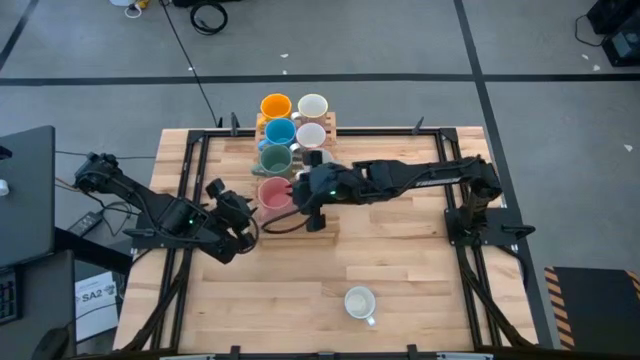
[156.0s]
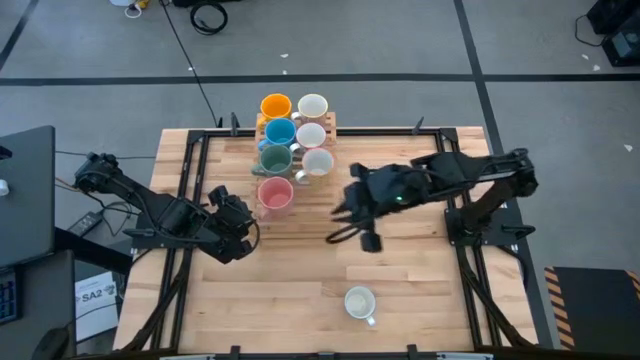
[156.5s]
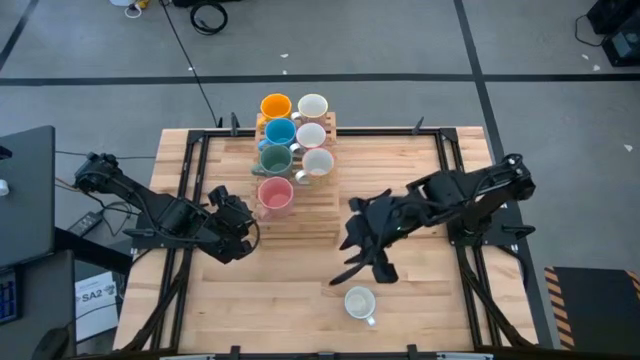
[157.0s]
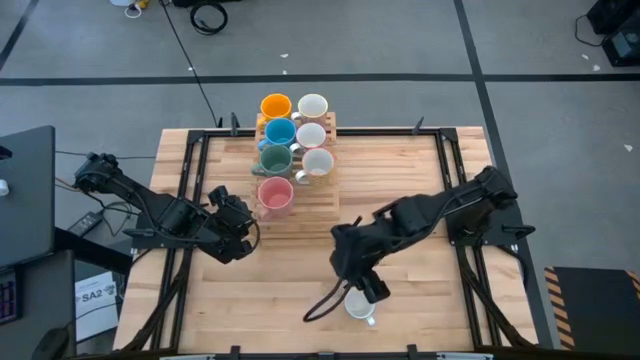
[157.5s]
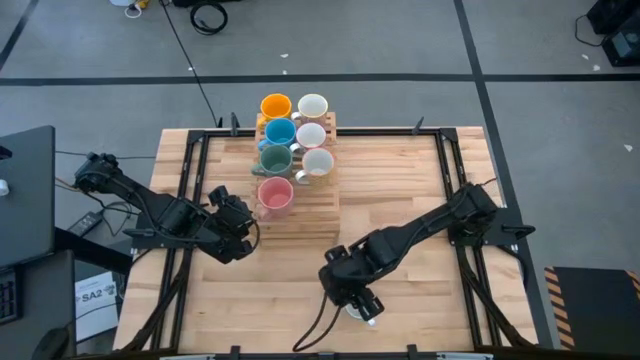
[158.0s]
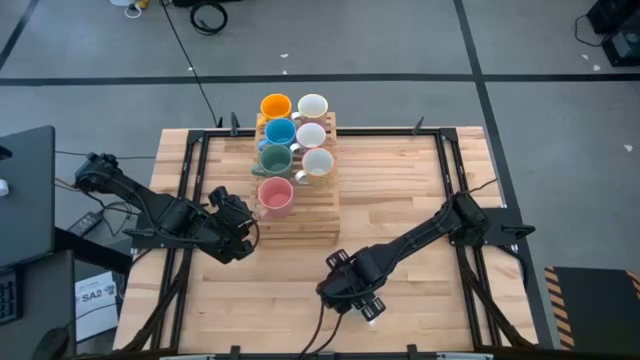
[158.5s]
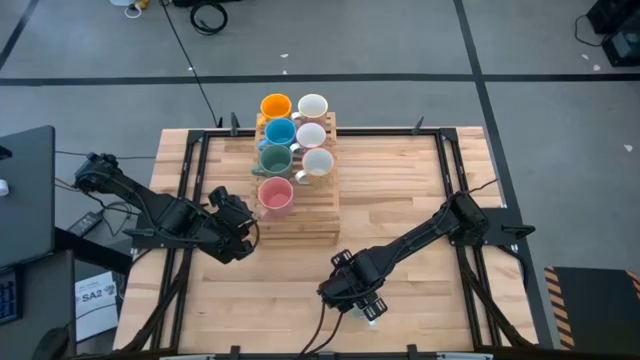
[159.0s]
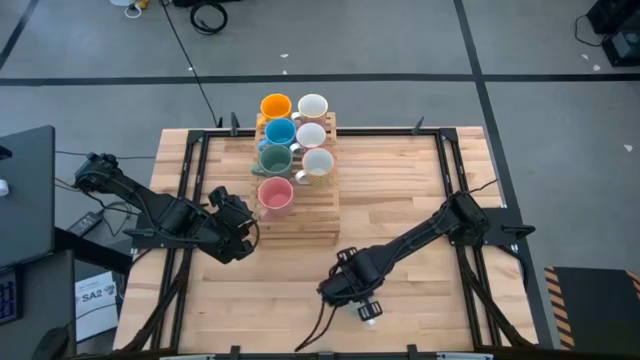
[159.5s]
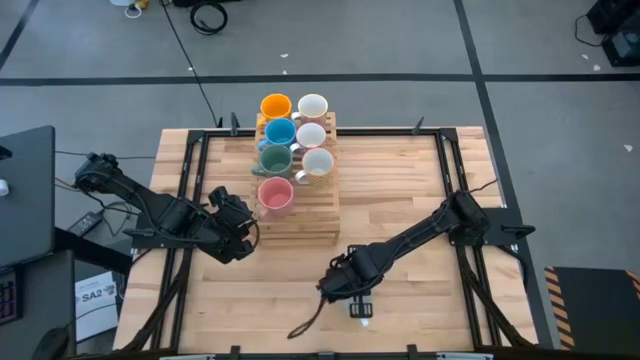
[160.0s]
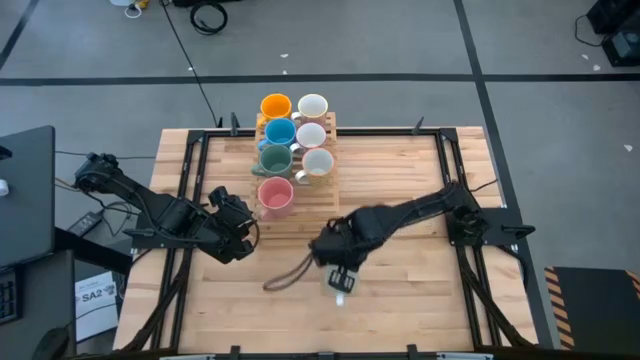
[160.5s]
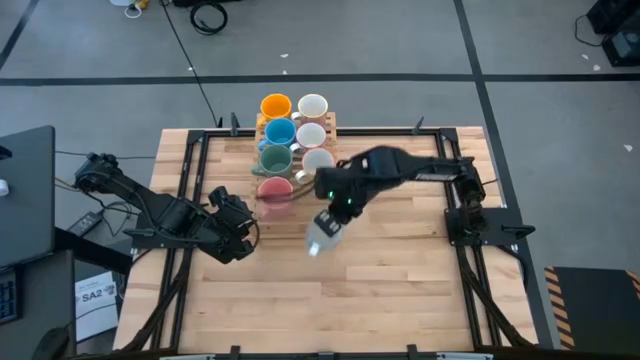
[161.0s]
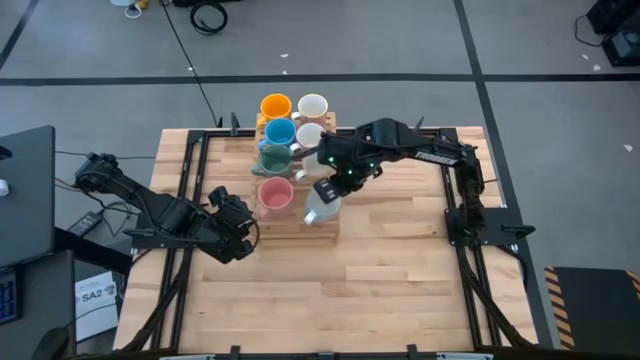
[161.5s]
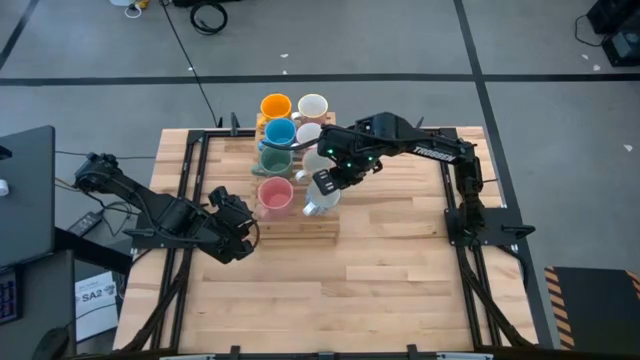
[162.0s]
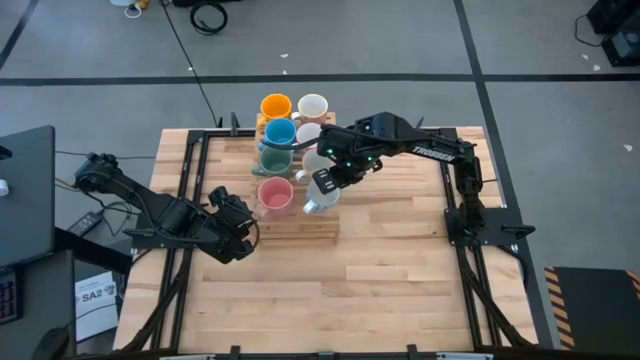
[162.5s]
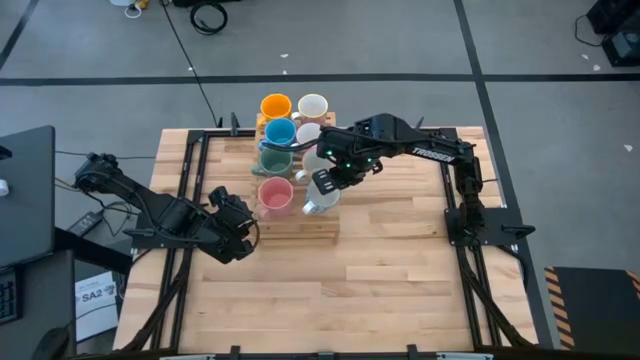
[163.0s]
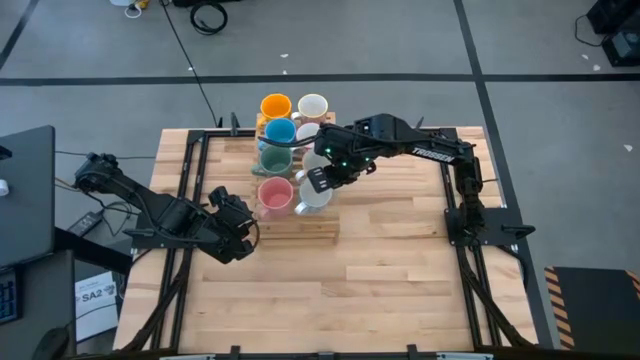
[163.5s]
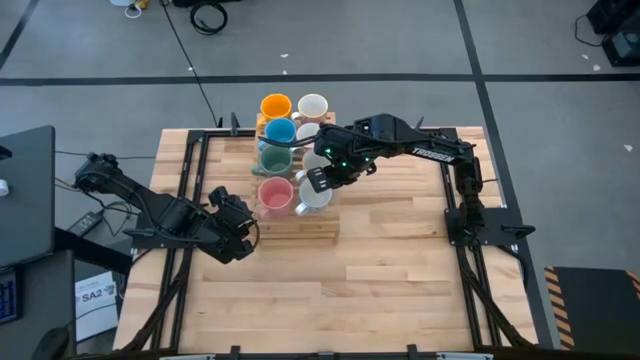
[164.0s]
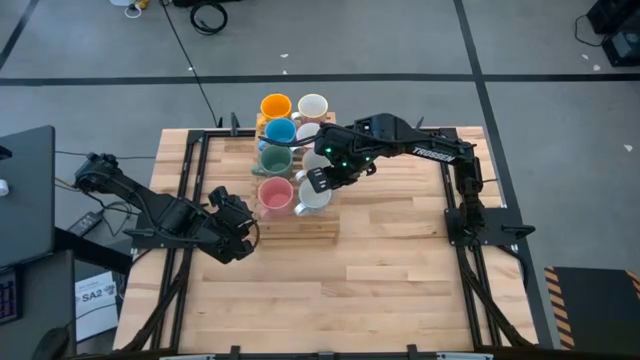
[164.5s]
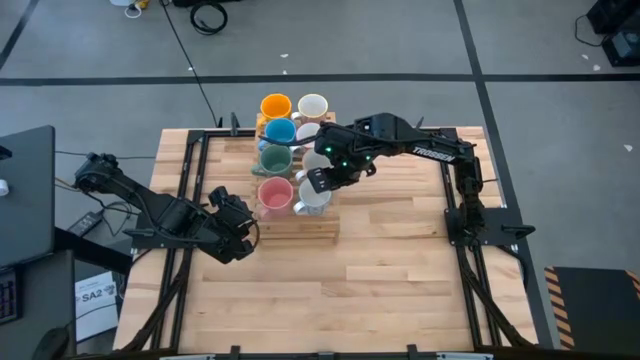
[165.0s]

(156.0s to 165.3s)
Task: Place coffee mugs
Put the light blue mug on the shelf

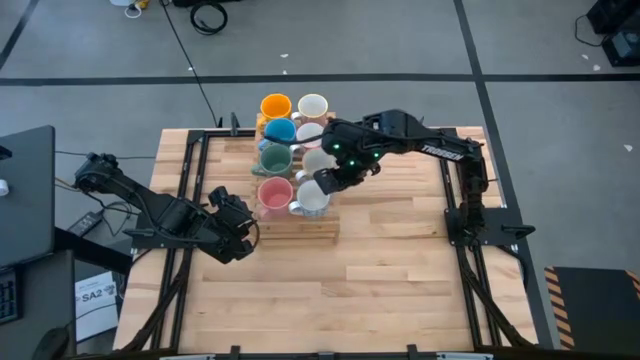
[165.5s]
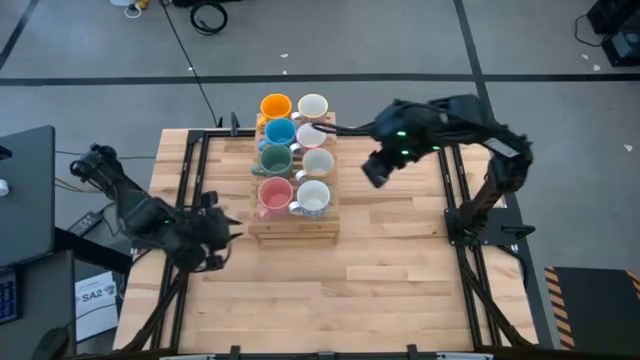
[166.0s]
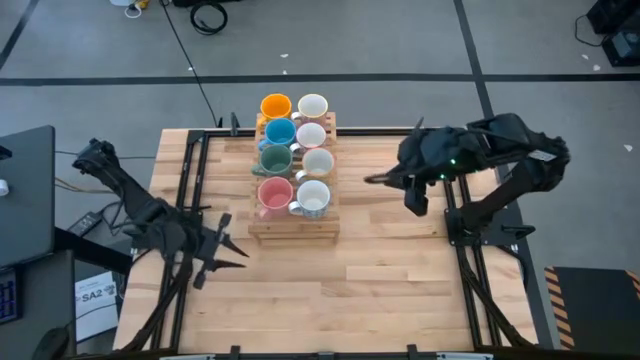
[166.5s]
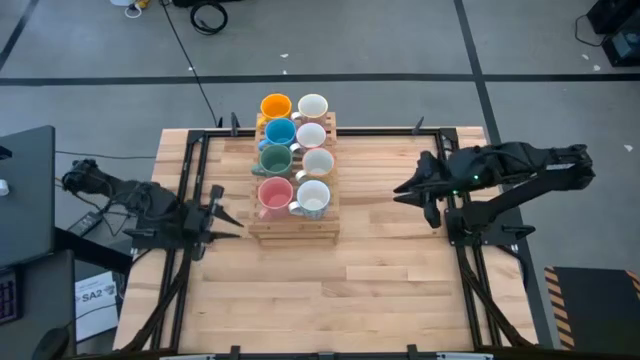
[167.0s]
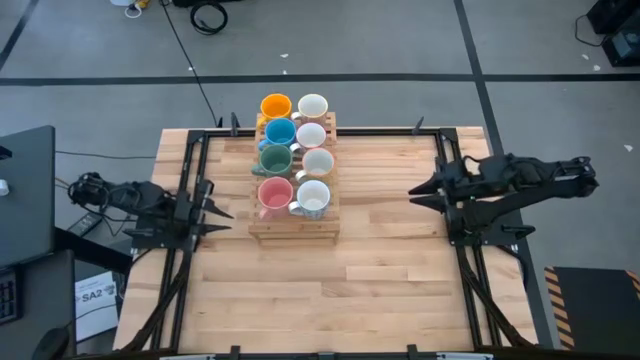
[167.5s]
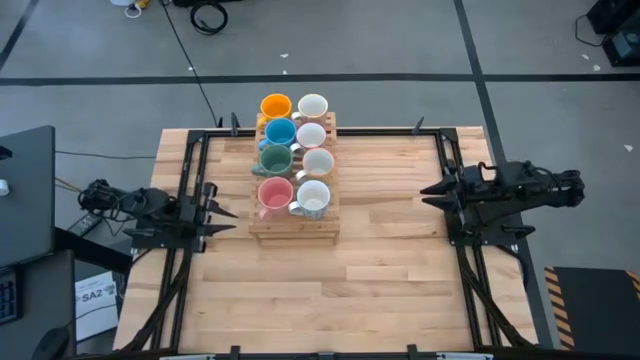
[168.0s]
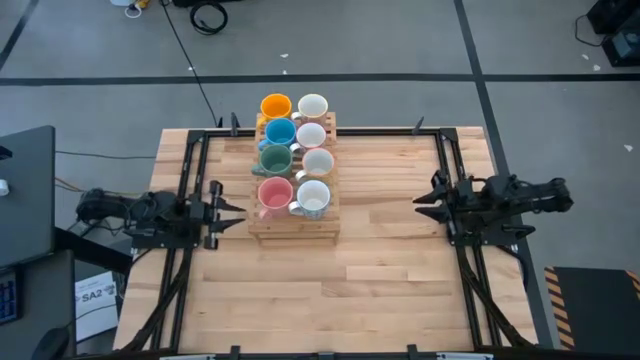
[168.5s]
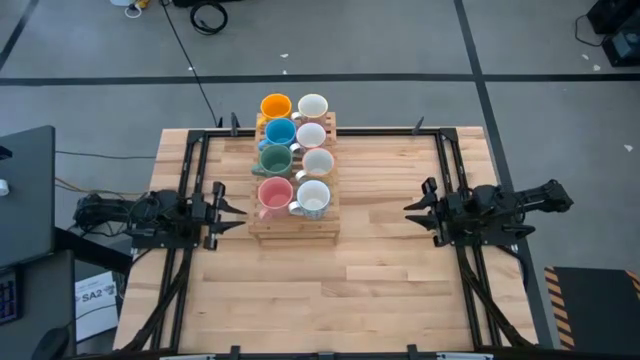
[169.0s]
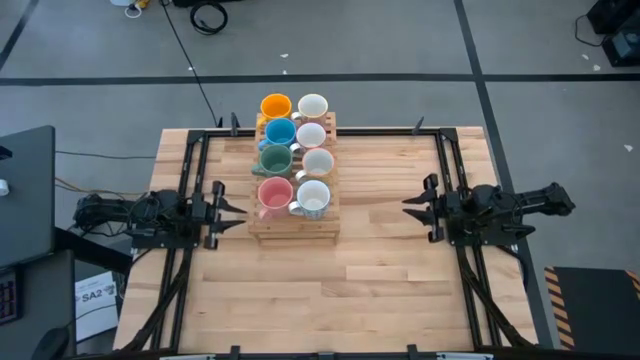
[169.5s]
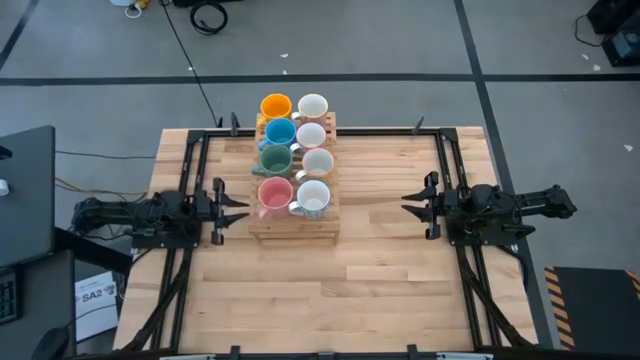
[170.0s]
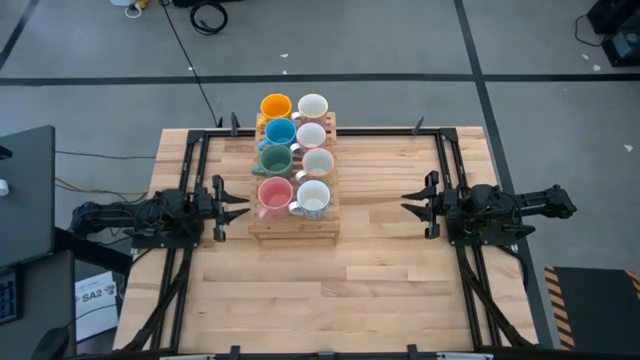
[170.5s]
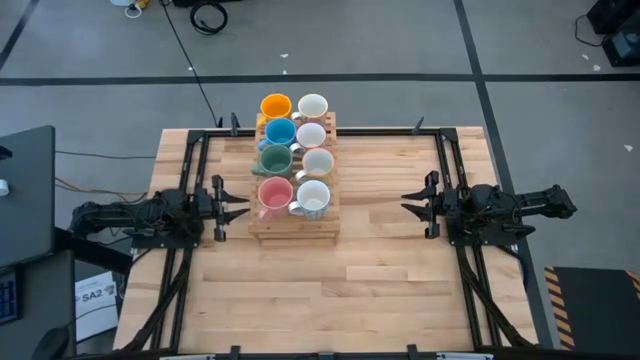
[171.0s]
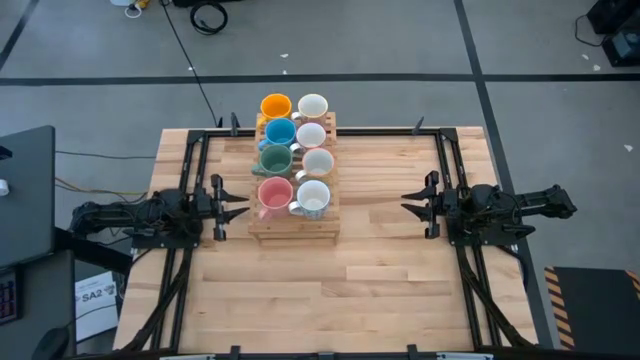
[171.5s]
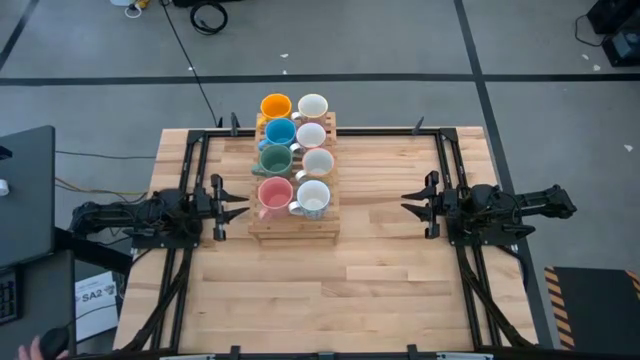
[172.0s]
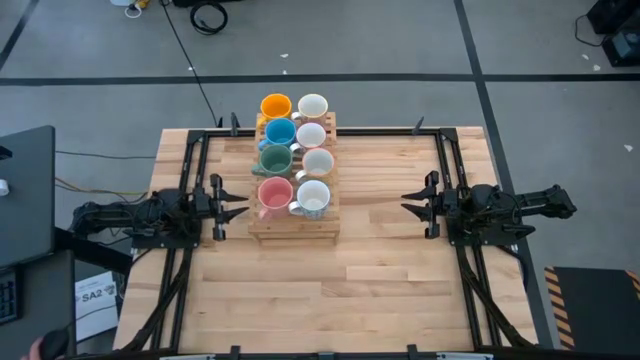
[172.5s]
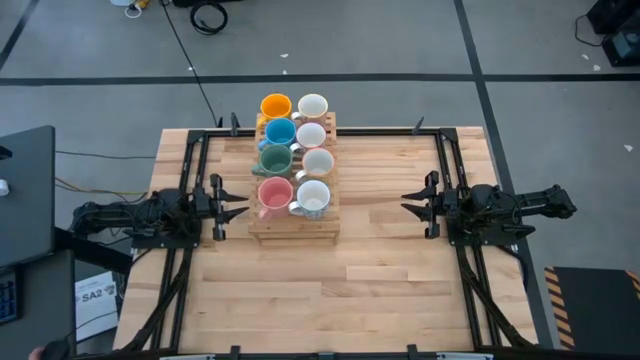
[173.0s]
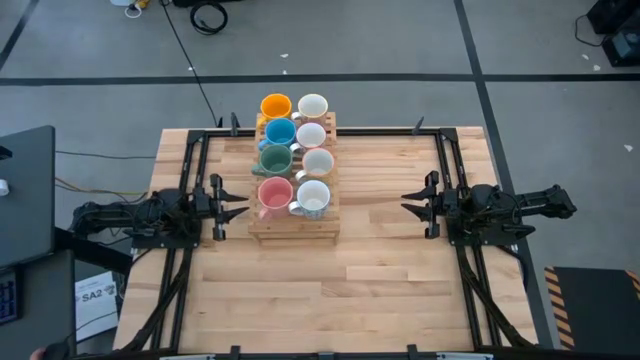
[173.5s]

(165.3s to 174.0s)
Return to Home Position

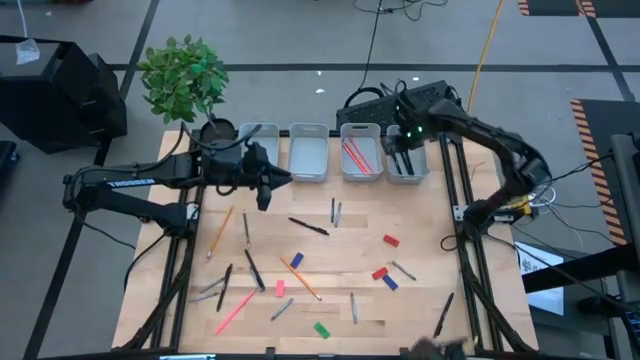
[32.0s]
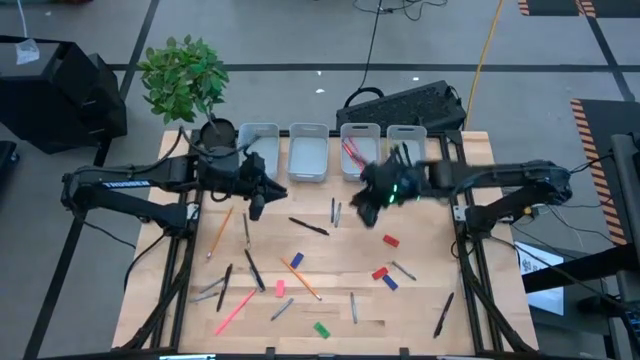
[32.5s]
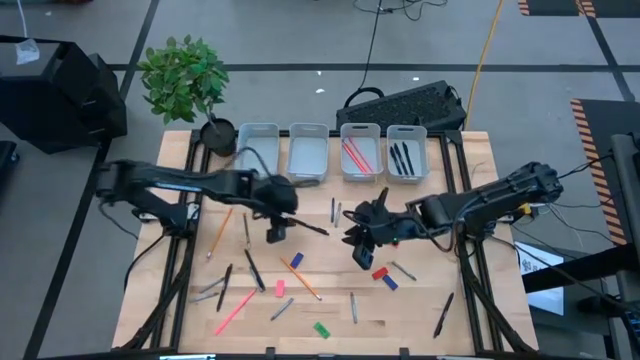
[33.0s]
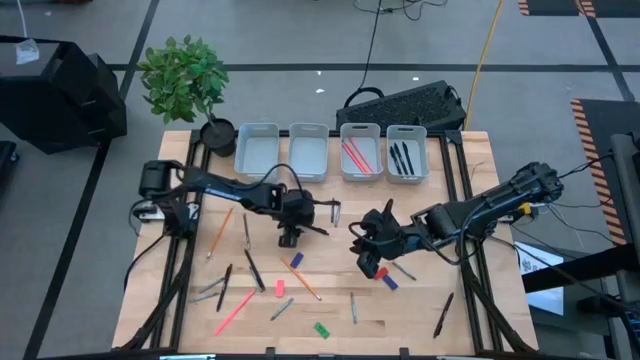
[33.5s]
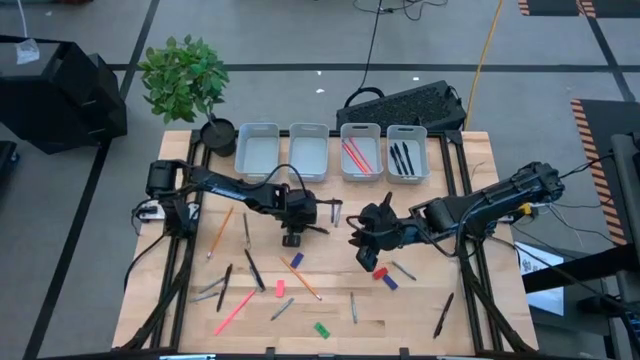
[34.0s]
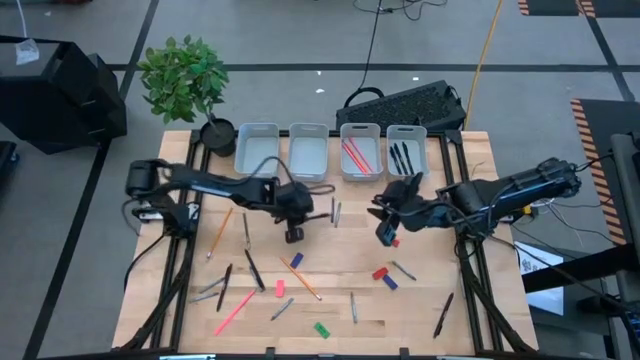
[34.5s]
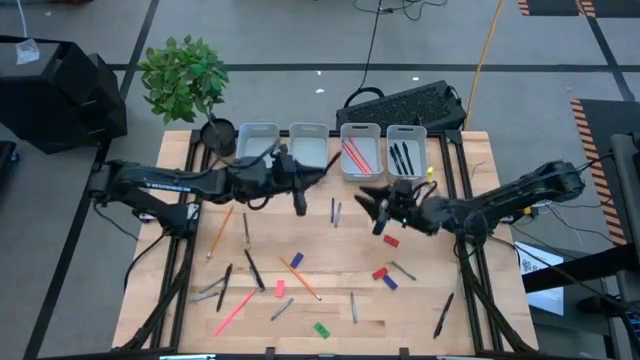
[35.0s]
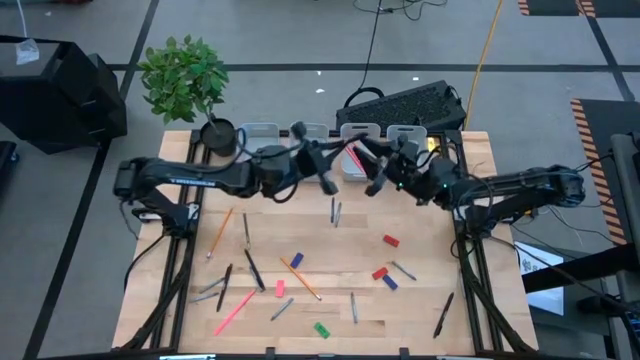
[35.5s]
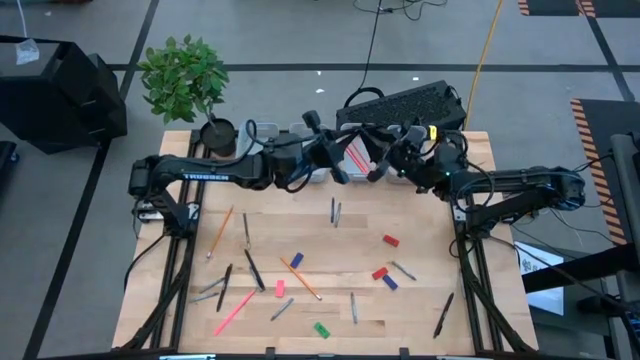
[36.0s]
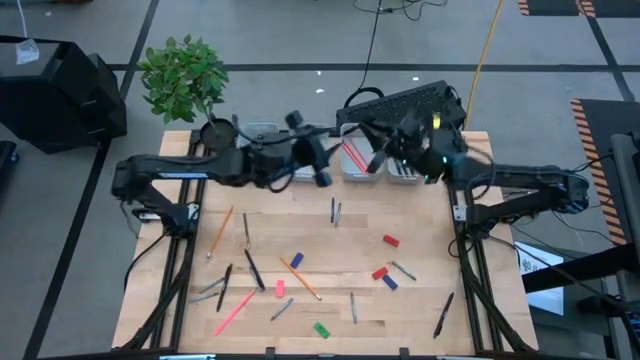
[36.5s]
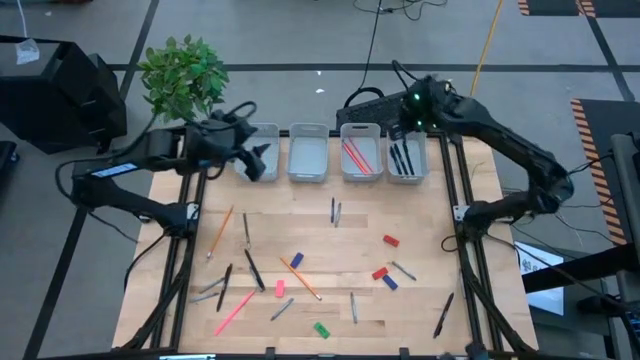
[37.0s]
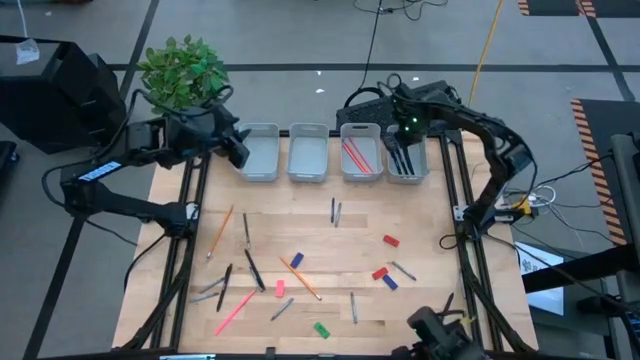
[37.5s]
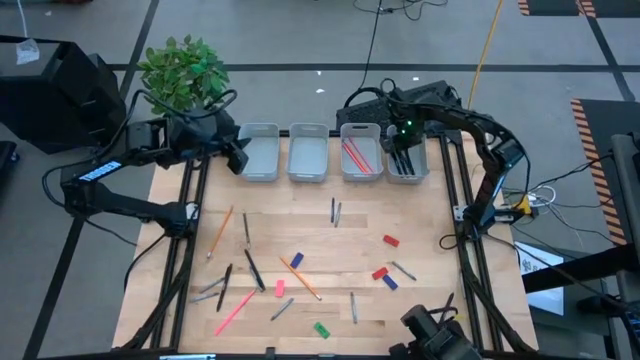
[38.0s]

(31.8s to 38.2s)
Task: Sort crayons/erasers/pens/pencils in bins
Put the black pen into the top right gray bin
